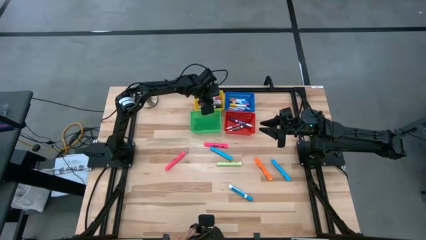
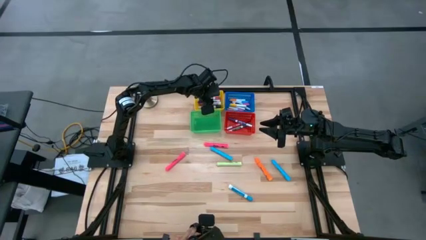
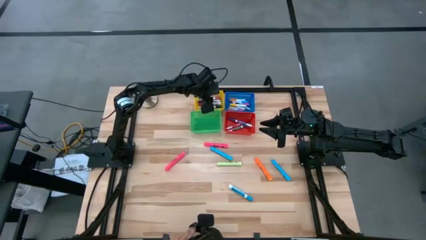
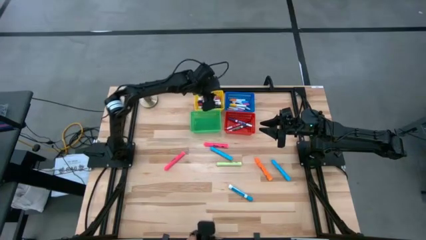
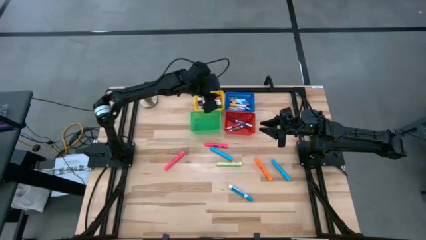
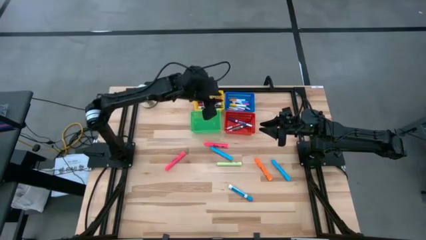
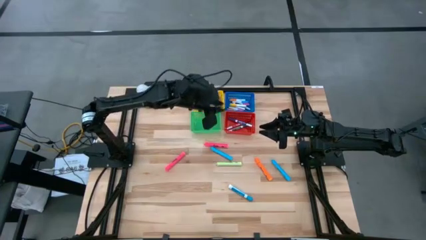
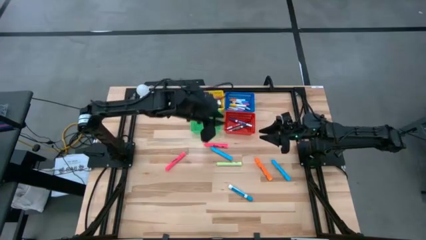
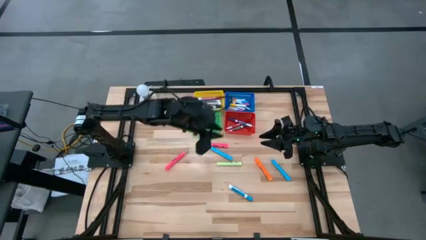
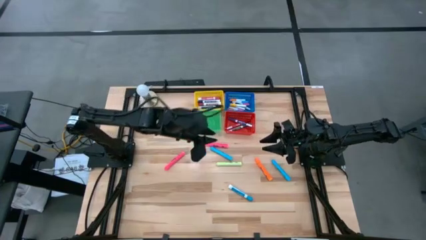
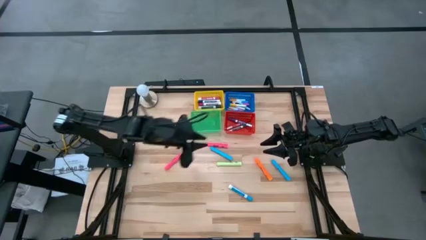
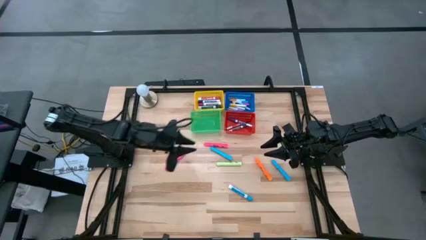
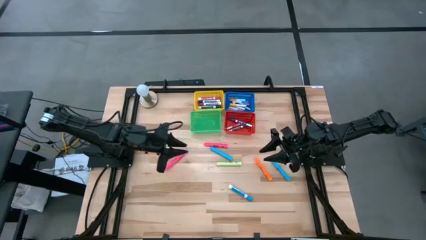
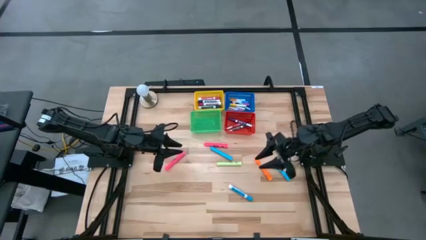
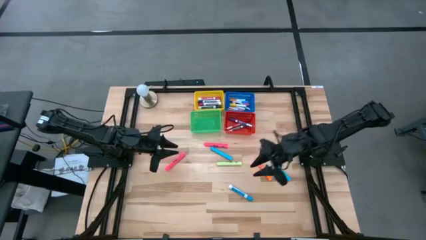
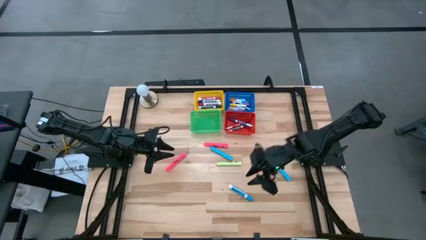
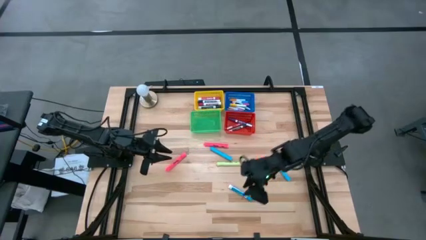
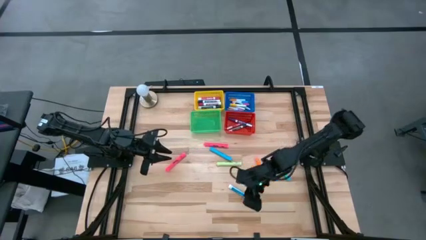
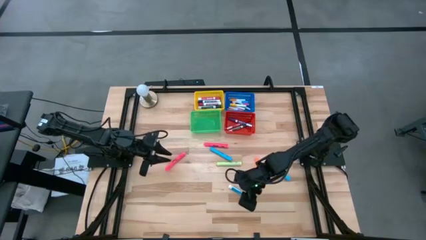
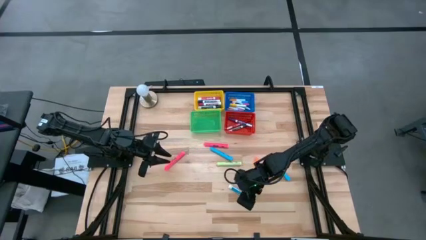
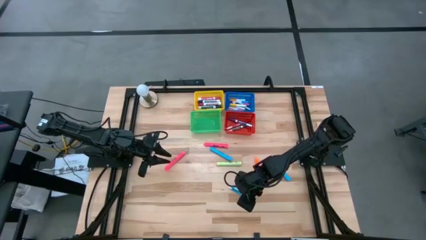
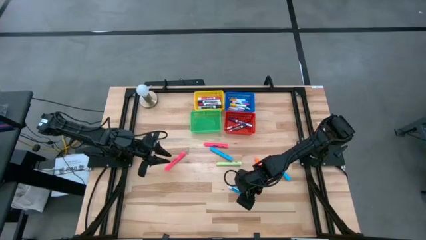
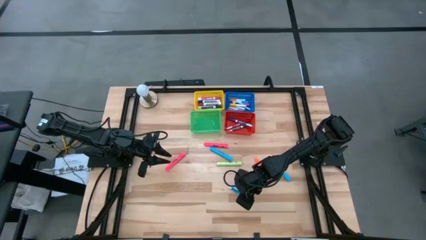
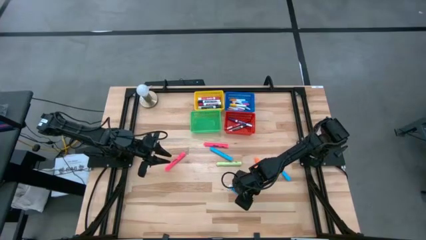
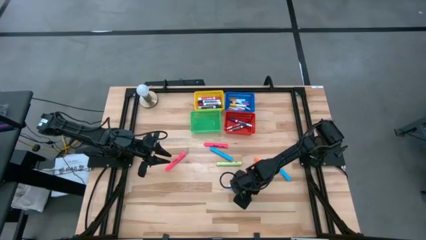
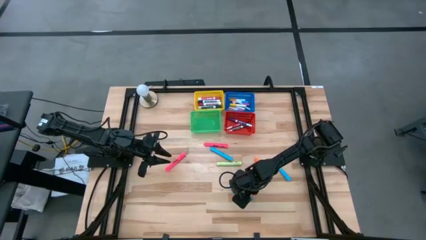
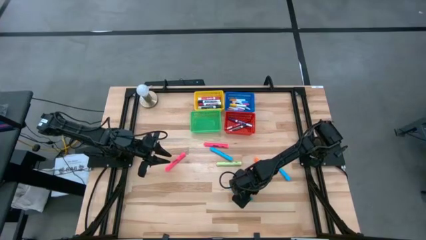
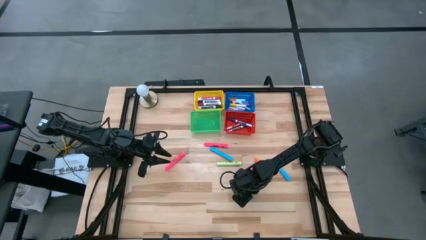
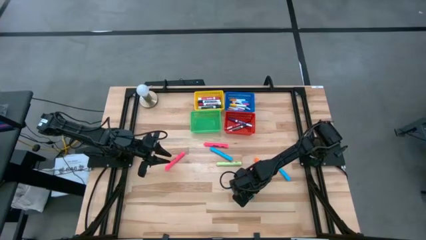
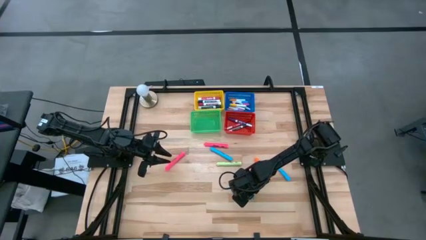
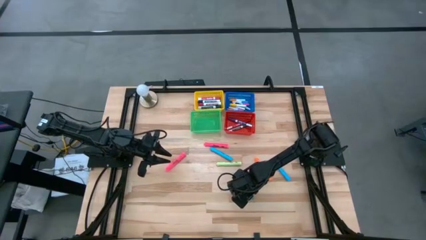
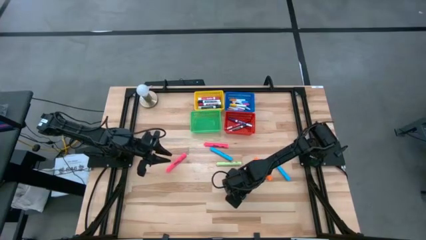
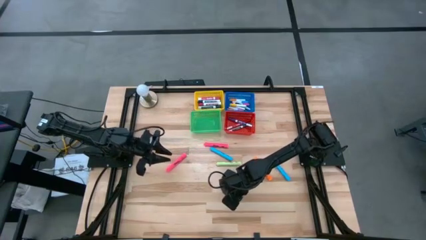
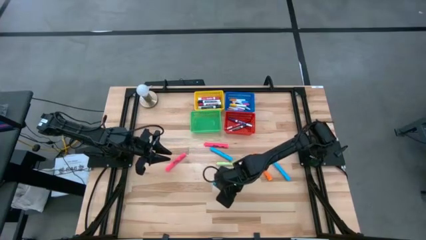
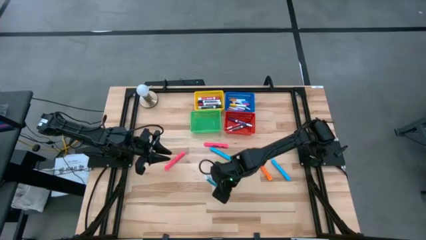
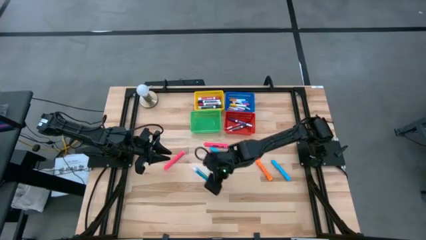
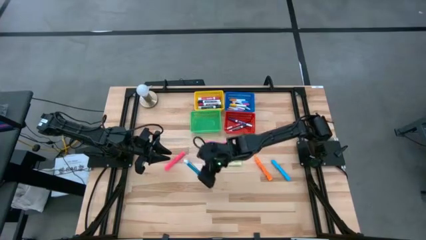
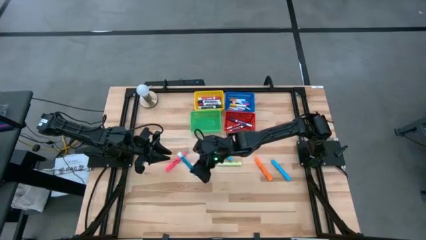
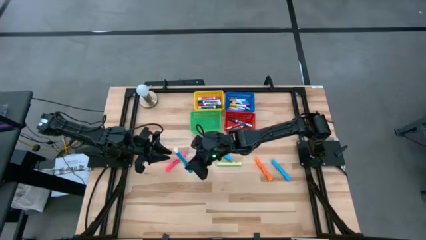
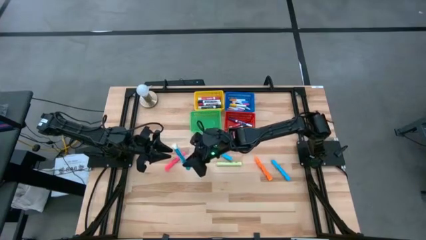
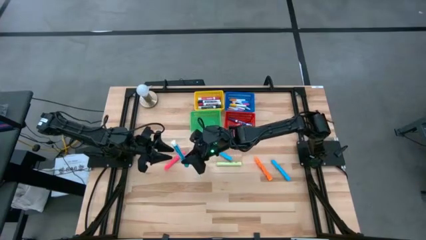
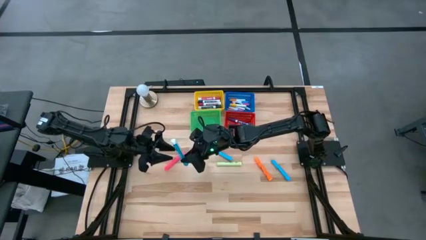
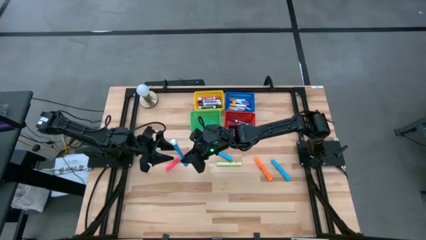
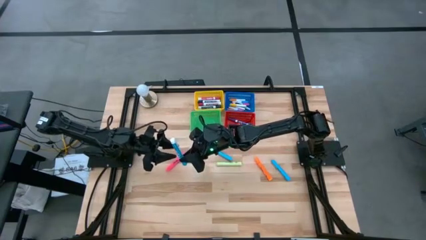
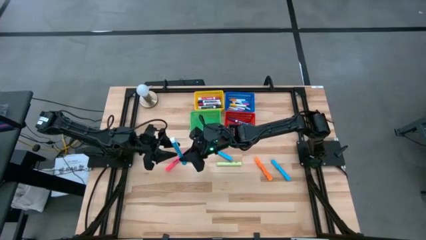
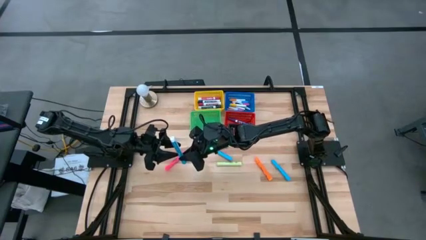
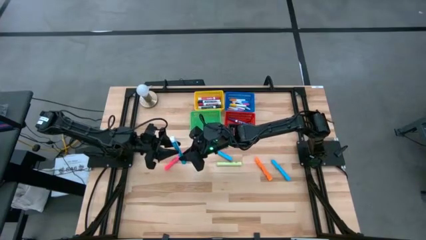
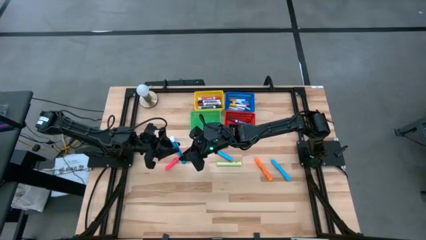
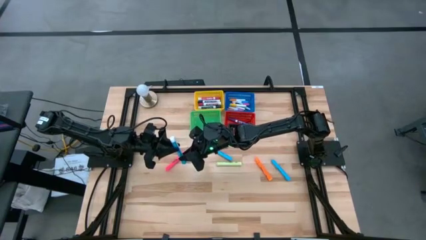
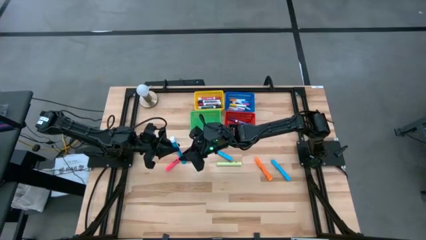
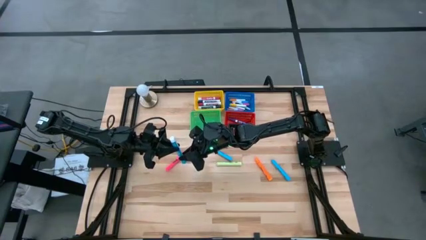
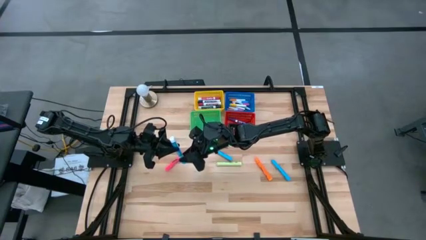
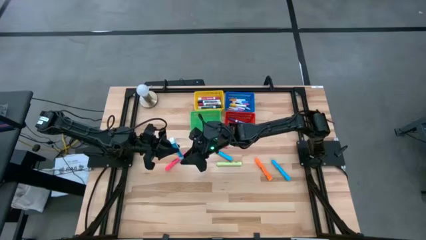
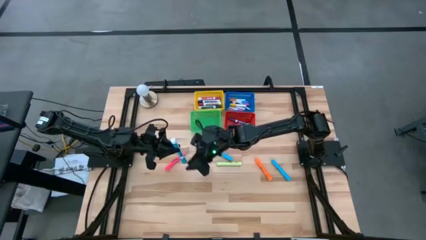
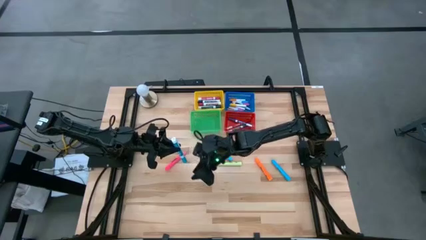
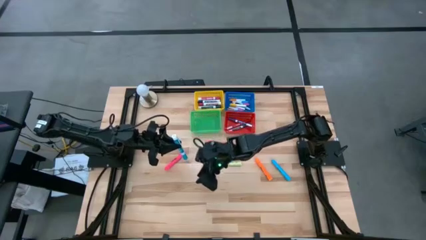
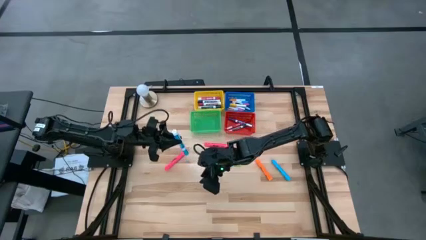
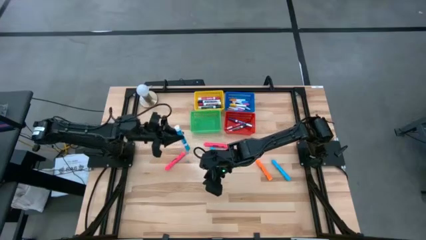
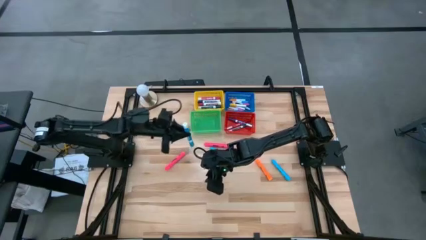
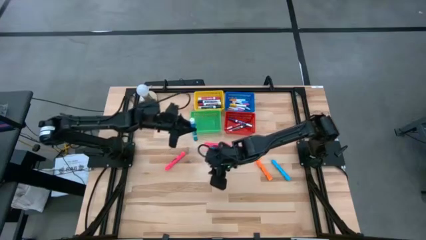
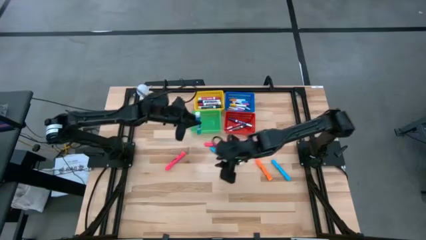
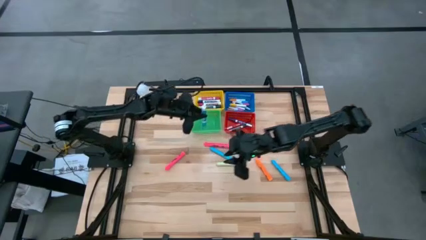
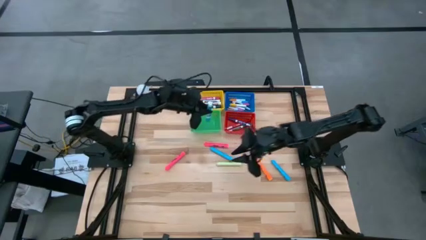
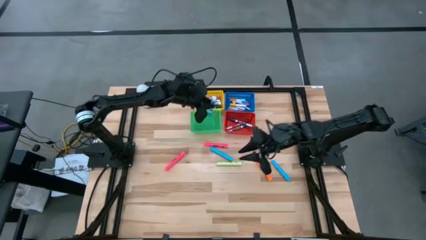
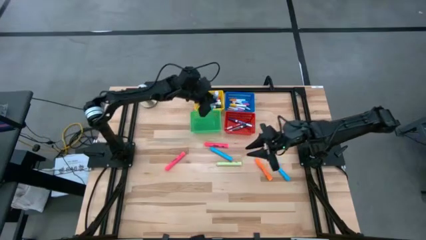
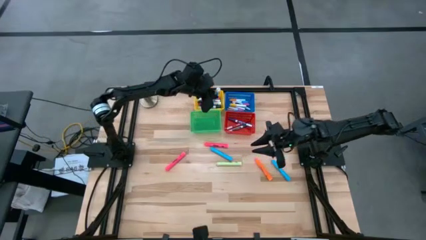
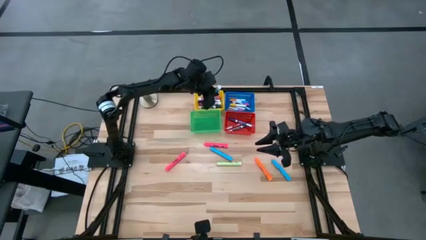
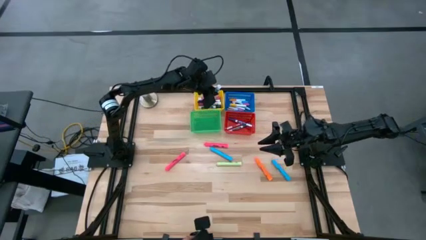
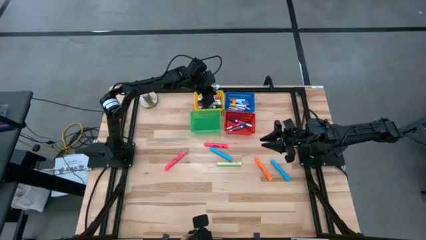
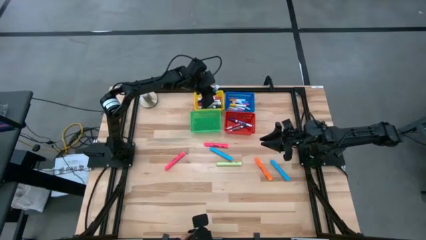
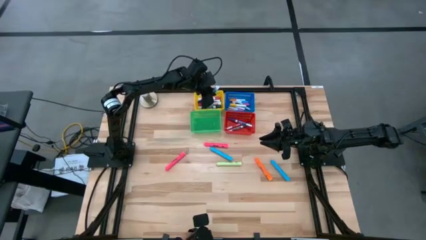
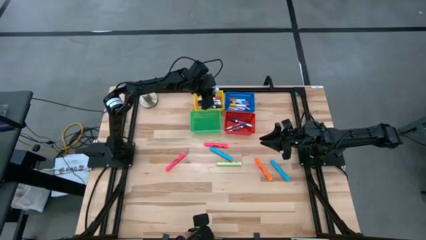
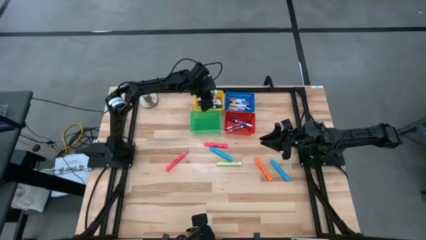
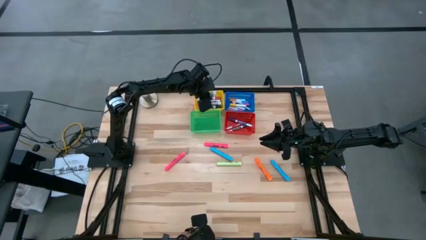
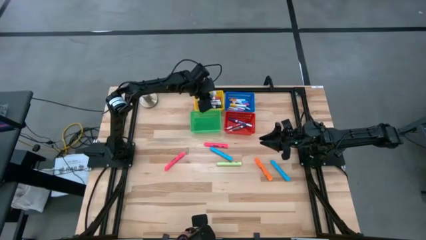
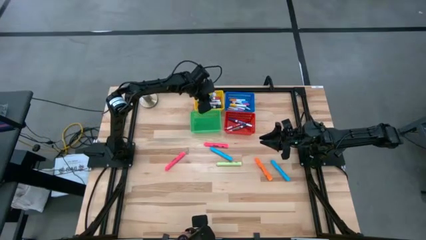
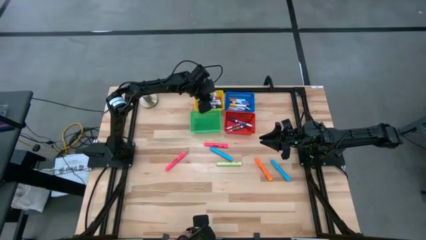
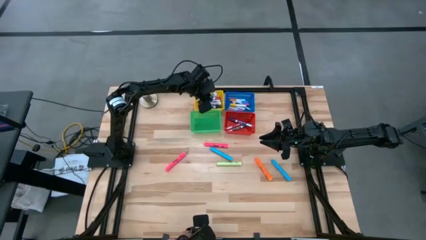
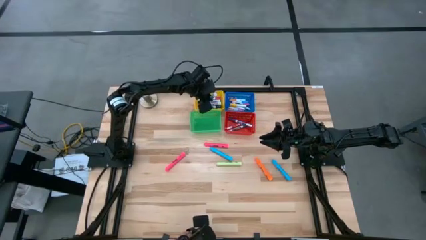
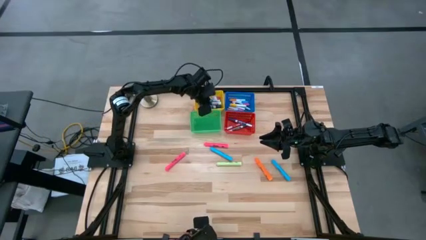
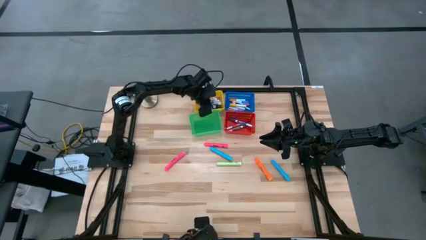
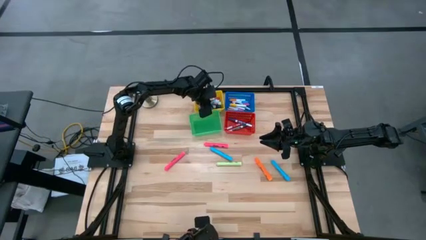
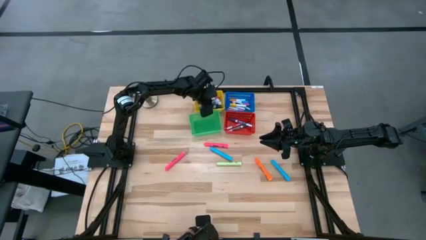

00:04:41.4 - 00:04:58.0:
Task: Pick & Place Markers
Put the large light blue marker pen into the yellow bin
